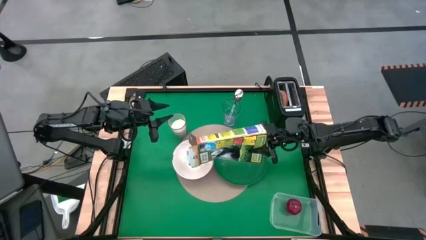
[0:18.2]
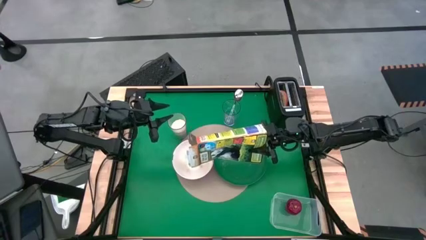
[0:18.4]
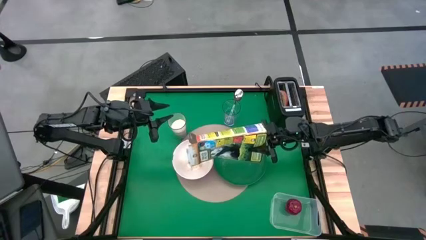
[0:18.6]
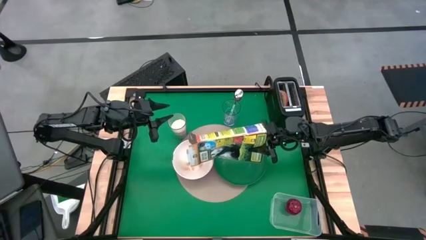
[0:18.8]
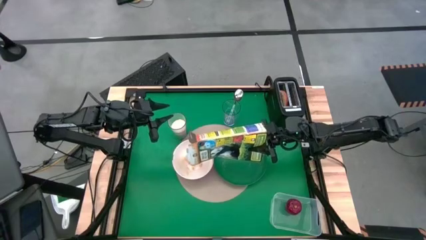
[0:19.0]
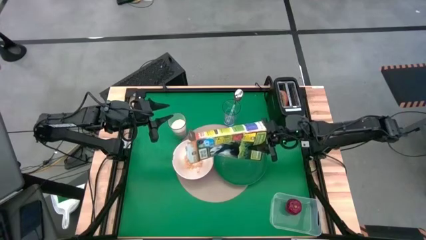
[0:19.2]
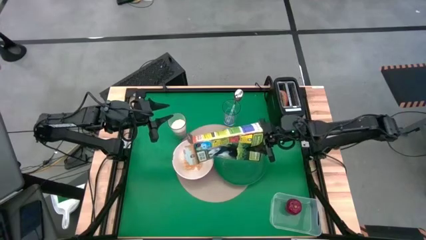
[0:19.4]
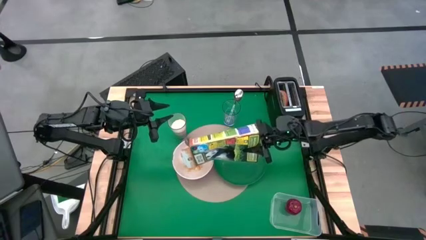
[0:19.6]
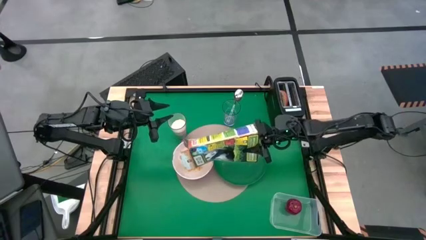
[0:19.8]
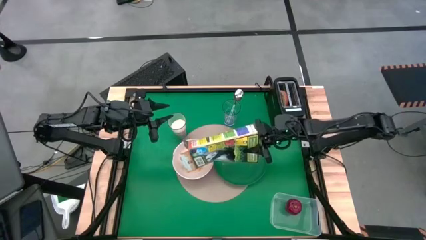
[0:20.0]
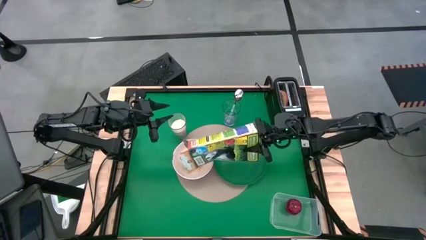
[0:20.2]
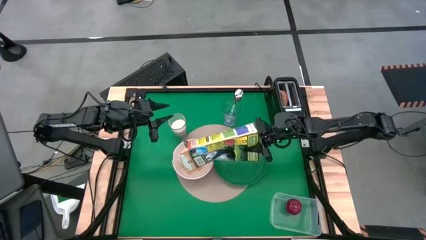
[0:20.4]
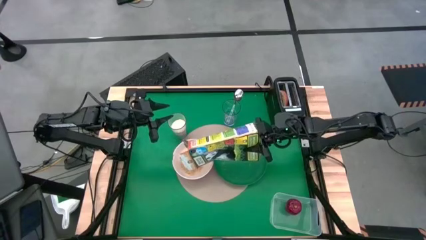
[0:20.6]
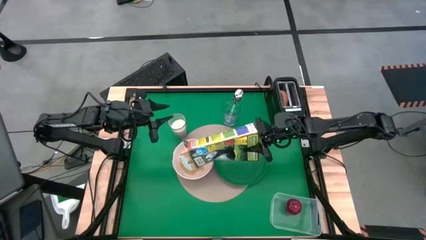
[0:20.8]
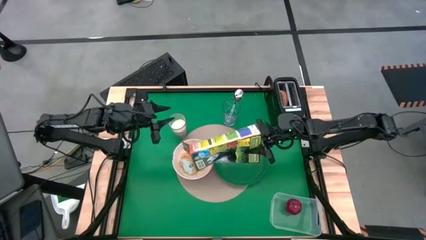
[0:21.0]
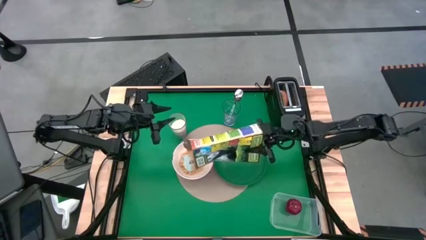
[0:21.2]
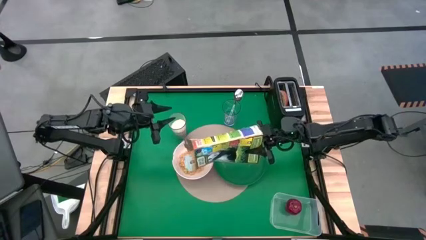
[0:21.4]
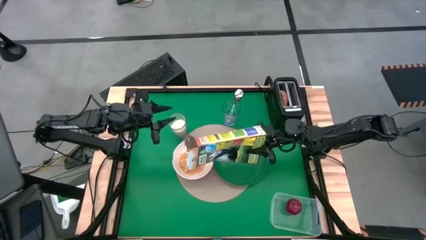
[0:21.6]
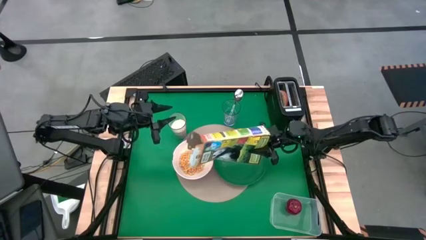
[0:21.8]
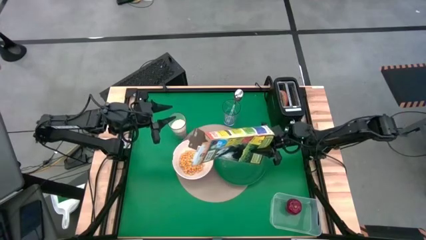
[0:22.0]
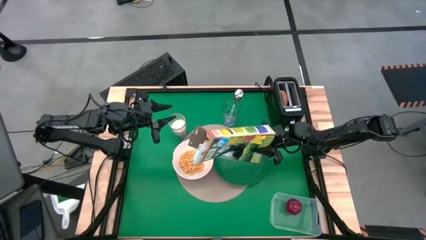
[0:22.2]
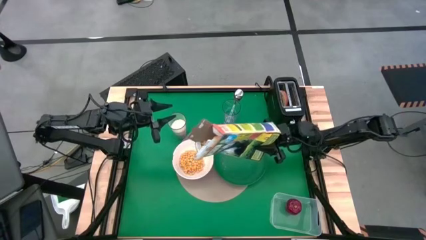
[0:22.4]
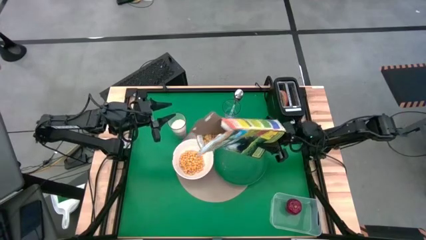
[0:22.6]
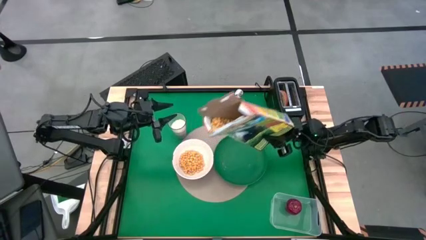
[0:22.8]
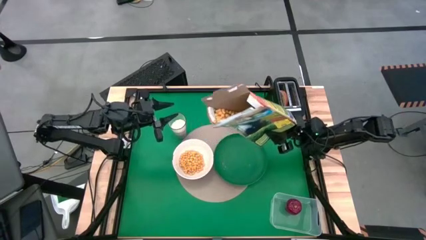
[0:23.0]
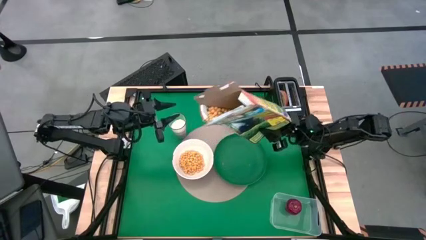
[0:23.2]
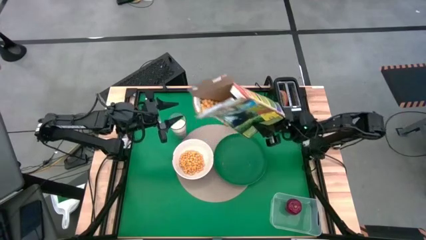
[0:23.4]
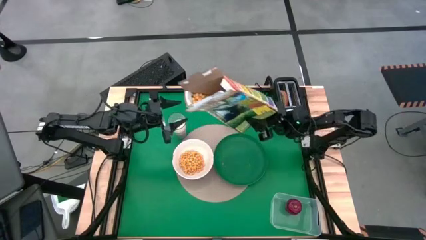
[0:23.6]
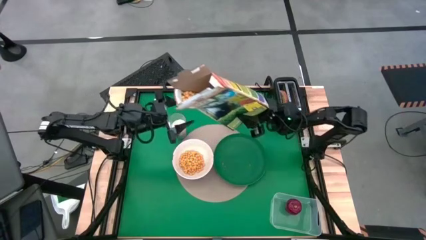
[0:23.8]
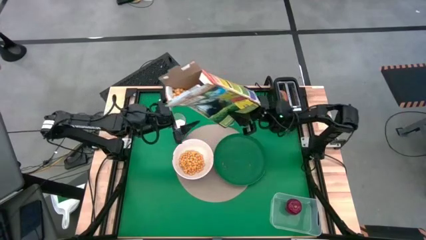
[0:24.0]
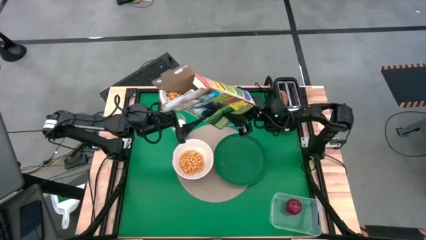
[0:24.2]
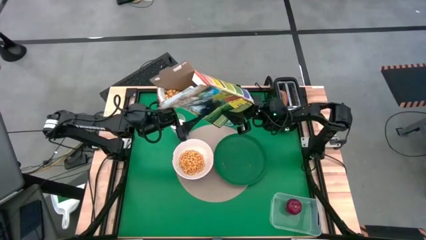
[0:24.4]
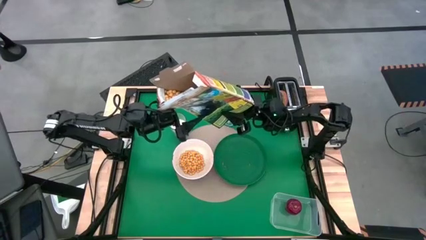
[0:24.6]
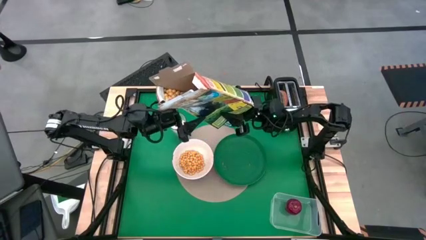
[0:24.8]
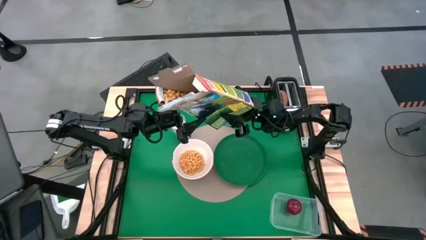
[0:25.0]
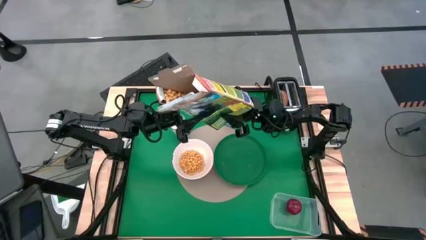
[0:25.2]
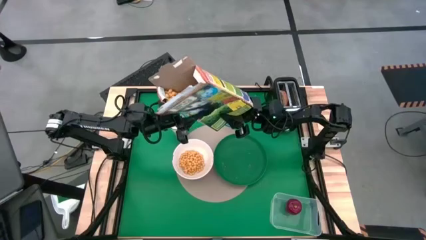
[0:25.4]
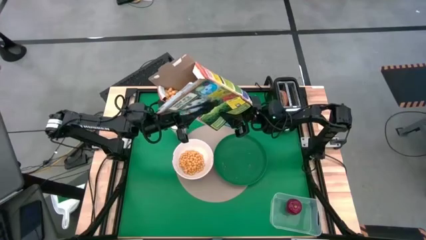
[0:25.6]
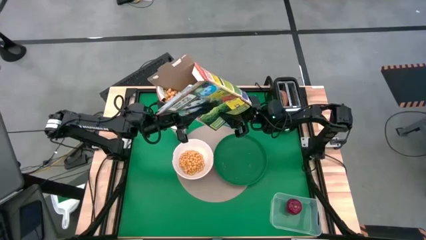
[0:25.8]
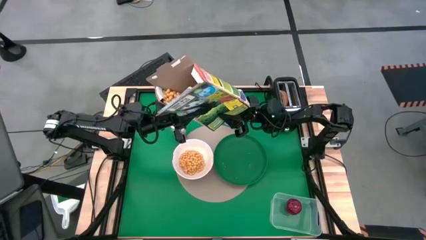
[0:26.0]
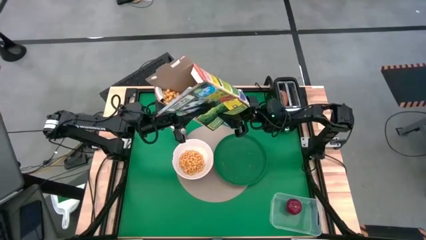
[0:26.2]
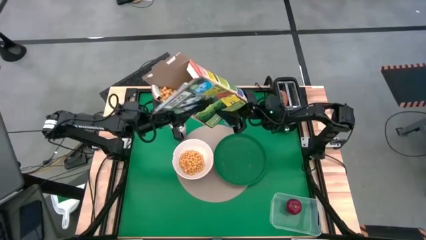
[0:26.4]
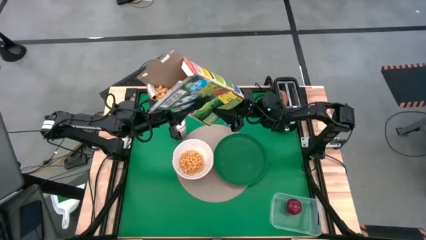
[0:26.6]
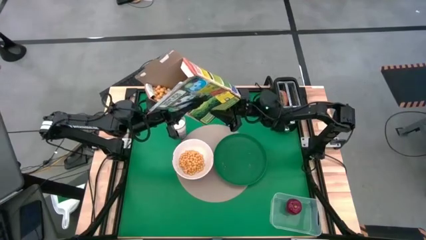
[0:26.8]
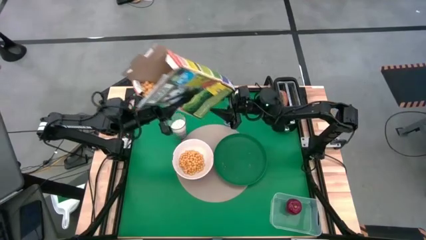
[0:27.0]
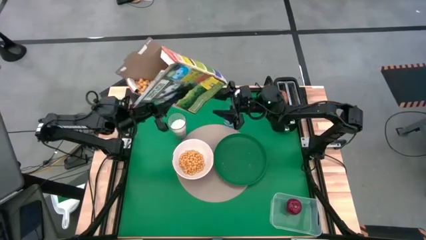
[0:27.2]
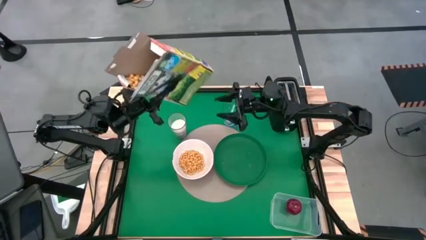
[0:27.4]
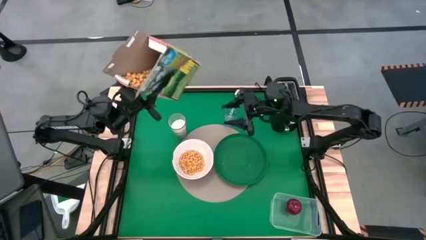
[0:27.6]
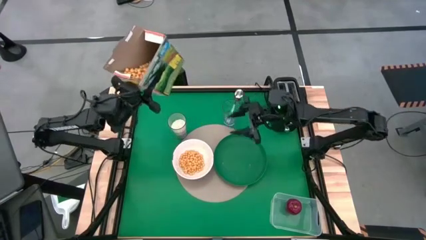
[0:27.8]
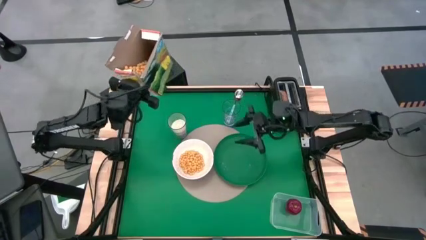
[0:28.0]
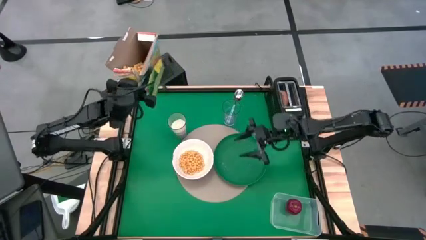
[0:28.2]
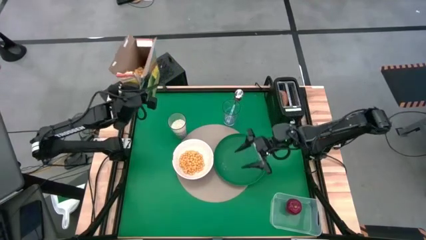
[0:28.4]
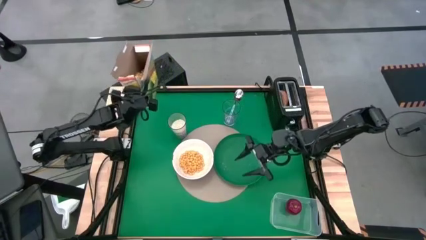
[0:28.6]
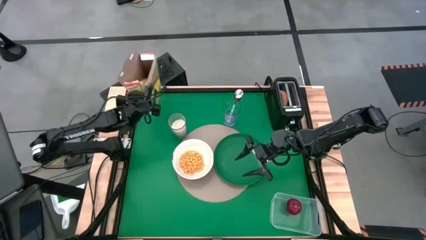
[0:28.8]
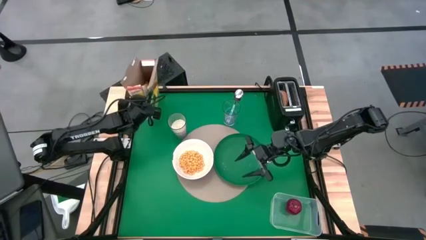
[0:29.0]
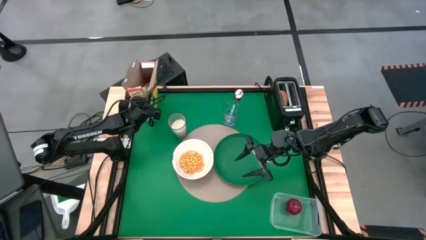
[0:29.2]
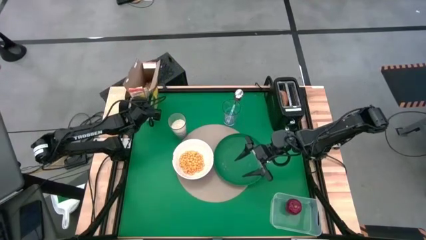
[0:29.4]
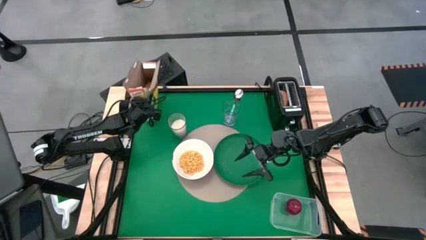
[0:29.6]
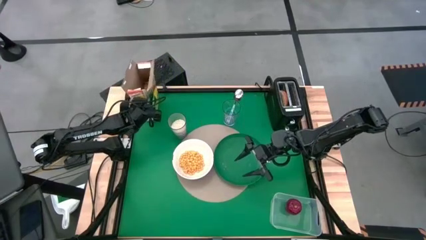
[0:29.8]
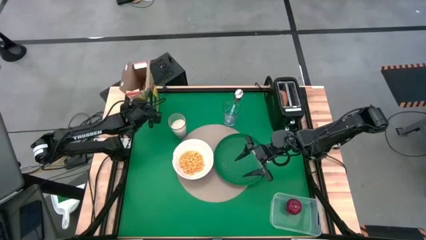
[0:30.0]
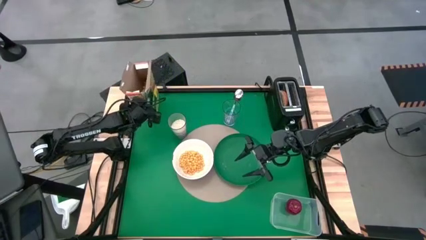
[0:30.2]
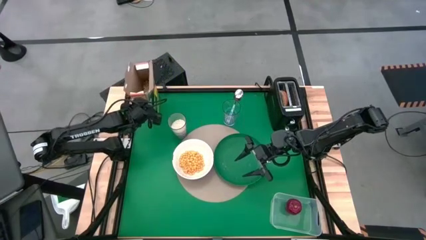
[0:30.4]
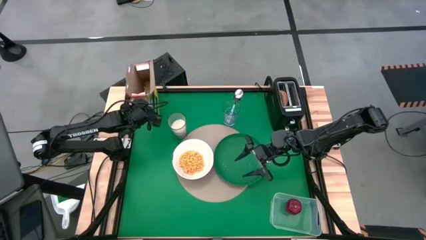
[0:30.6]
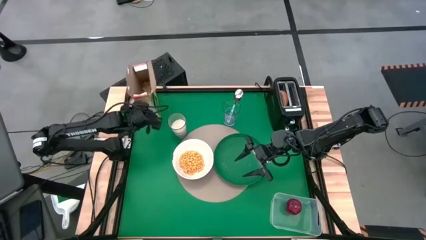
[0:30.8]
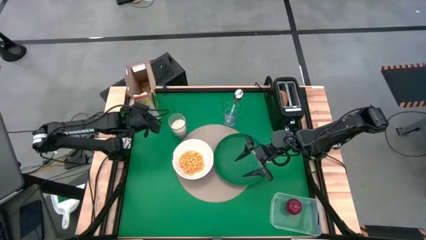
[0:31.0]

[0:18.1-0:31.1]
Task: Arrange a breakfast setting
Pour the cereal into the white bowl

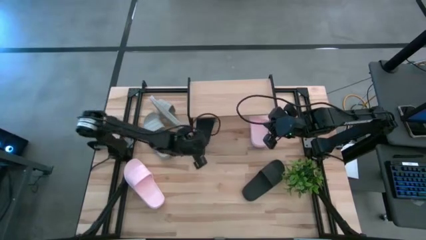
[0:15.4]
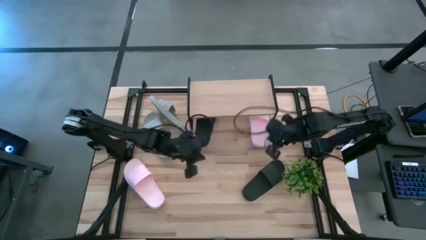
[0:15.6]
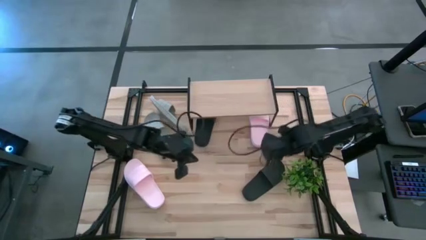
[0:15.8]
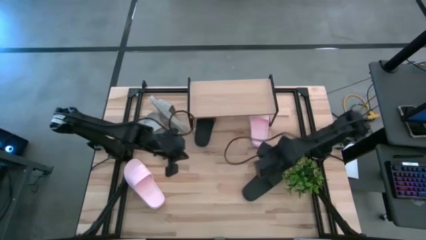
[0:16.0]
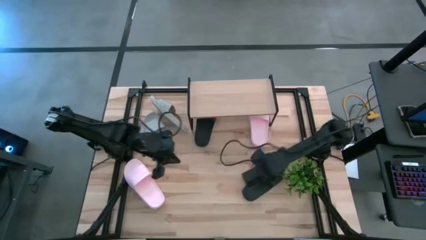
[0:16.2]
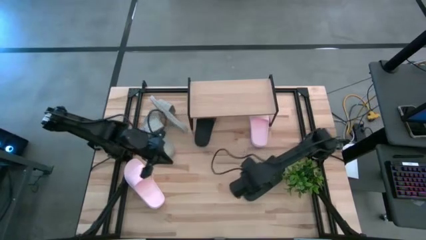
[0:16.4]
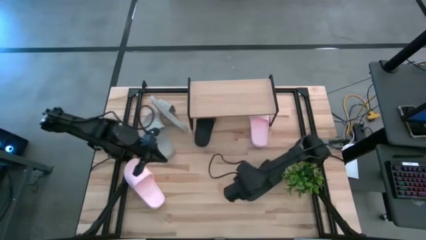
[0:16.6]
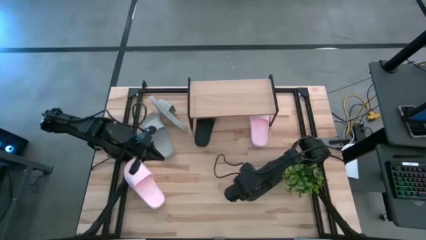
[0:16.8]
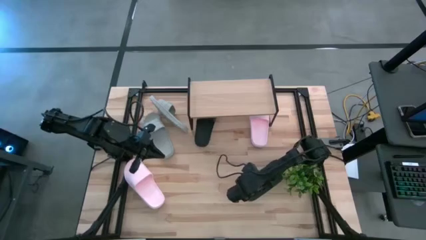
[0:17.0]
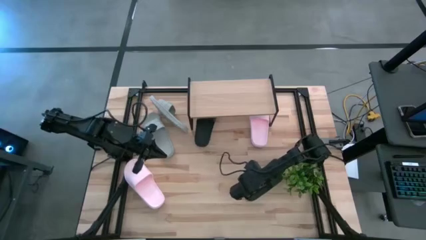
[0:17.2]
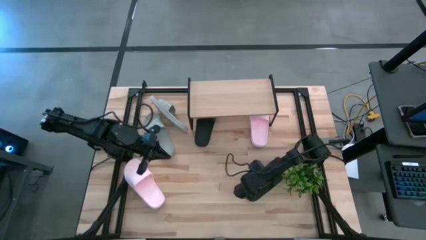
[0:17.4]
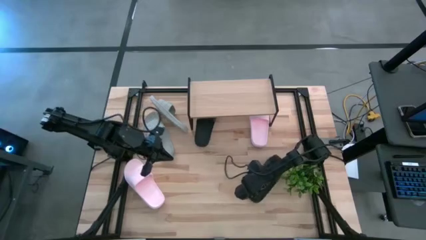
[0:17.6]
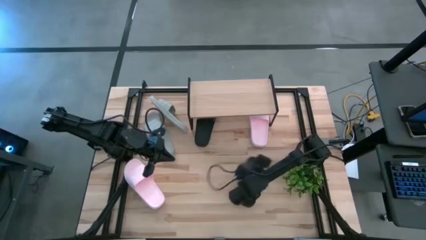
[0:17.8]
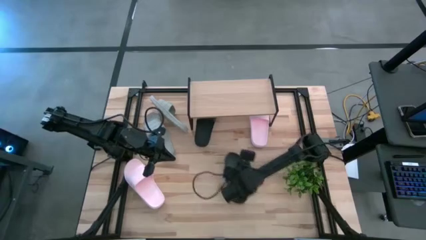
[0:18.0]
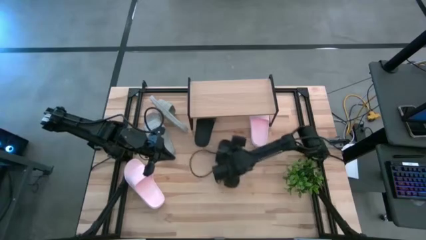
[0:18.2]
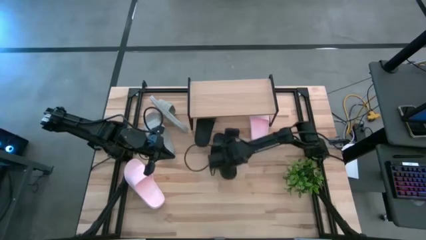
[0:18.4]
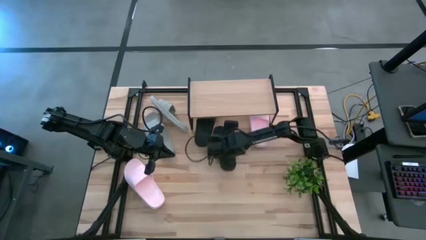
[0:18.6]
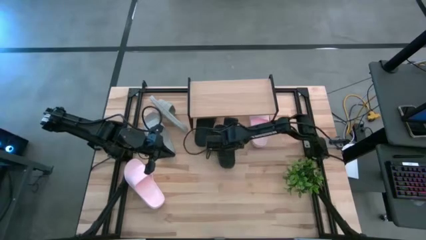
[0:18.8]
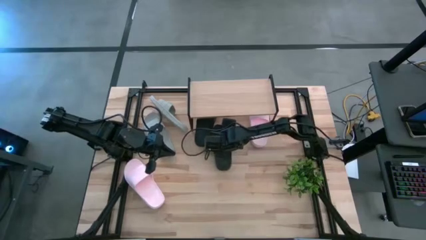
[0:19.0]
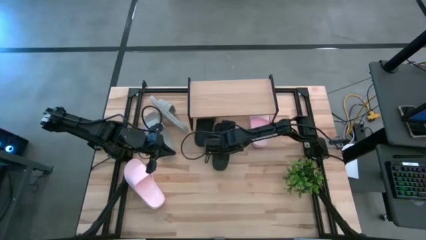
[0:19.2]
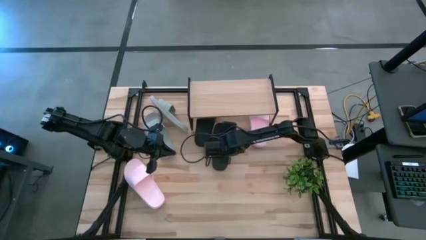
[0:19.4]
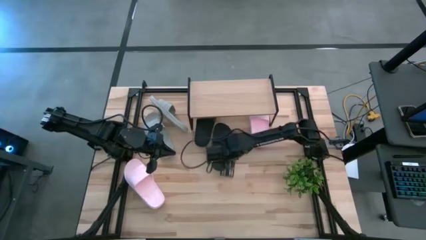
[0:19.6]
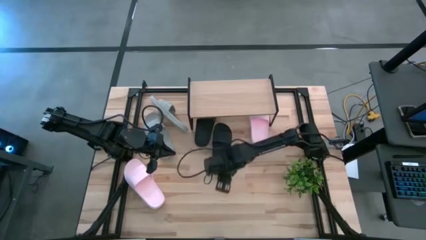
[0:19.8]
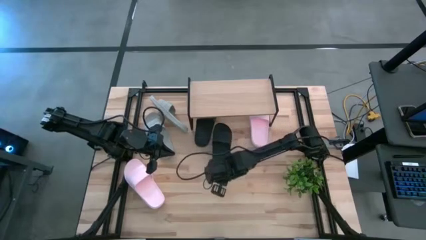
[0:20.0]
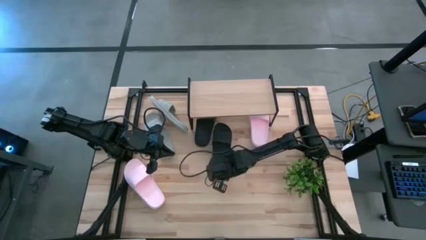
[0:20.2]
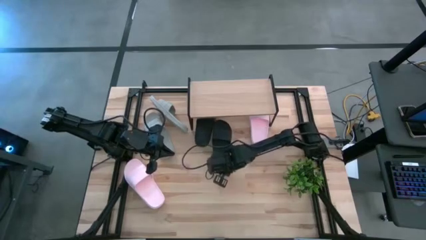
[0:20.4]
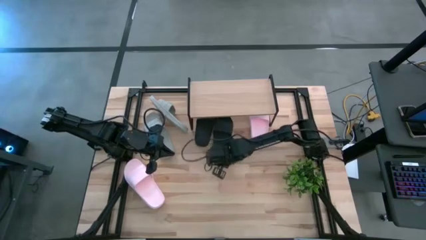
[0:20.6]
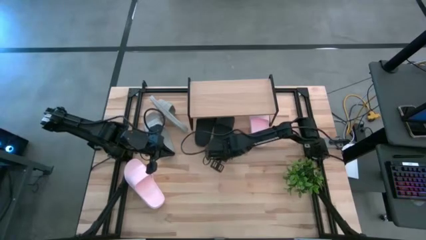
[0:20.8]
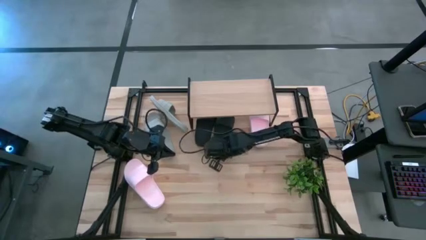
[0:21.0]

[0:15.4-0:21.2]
Task: Pick and place slides into the shelf
Put the black slide under the shelf
